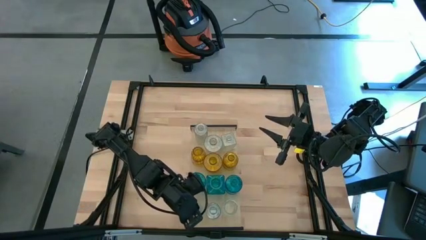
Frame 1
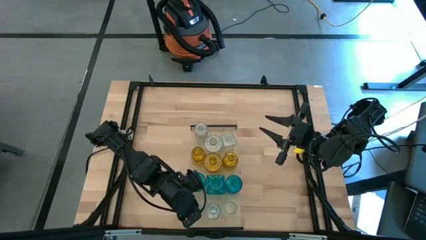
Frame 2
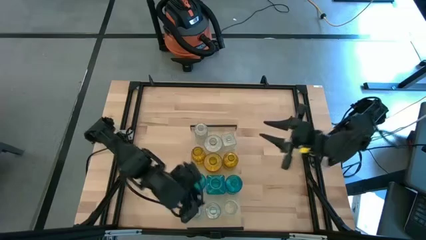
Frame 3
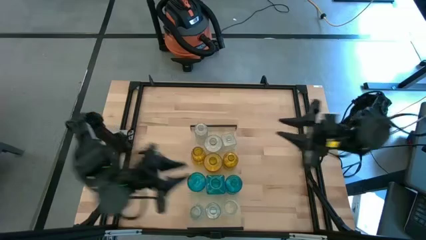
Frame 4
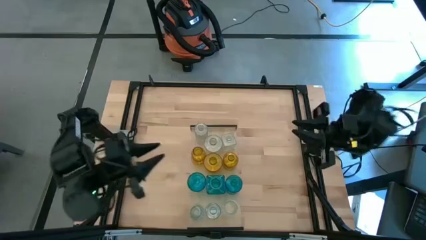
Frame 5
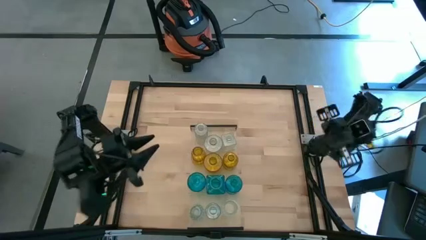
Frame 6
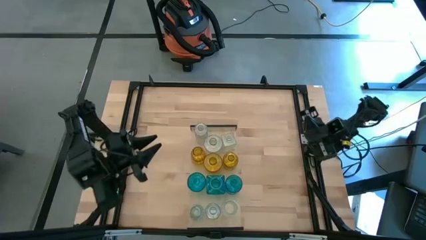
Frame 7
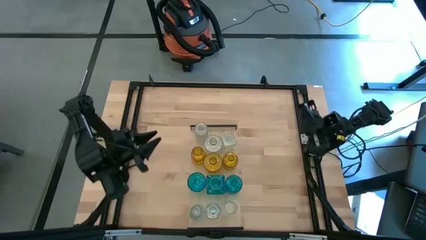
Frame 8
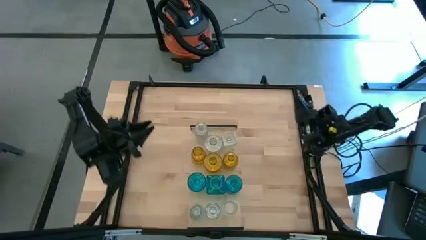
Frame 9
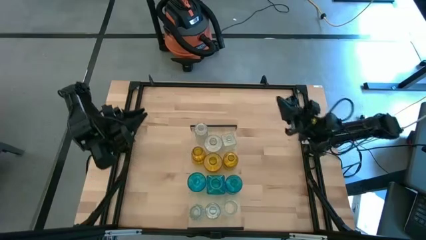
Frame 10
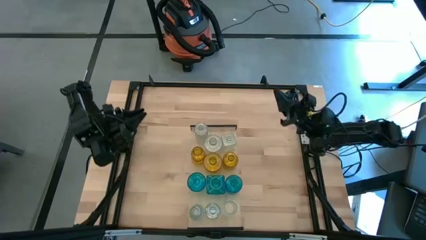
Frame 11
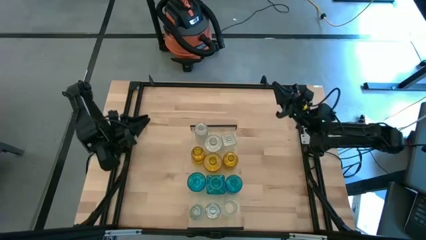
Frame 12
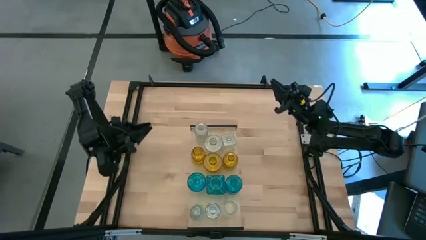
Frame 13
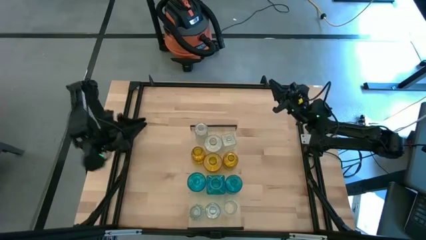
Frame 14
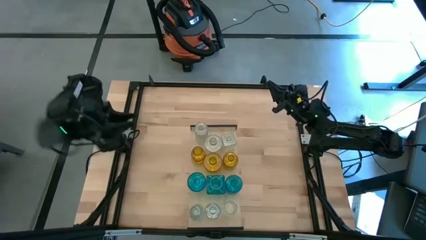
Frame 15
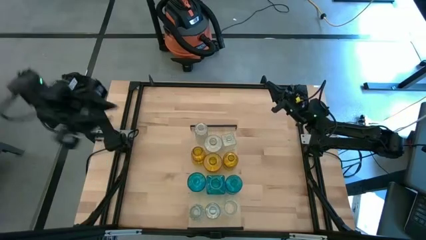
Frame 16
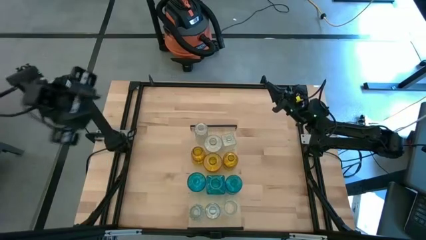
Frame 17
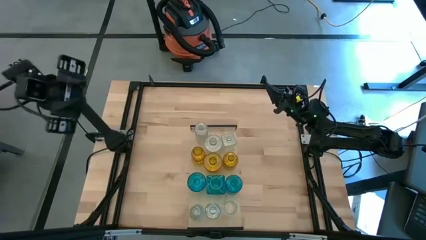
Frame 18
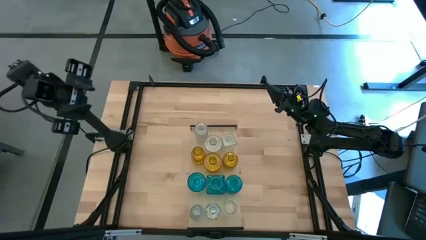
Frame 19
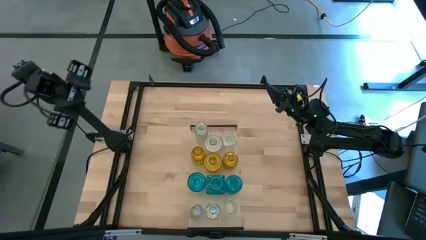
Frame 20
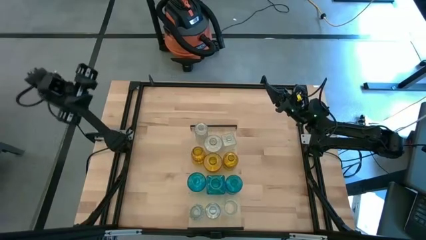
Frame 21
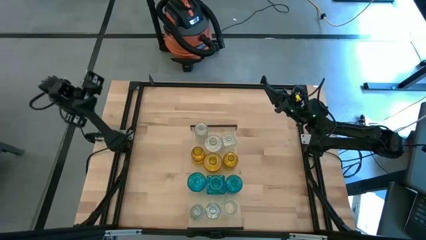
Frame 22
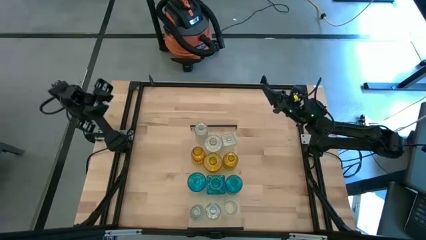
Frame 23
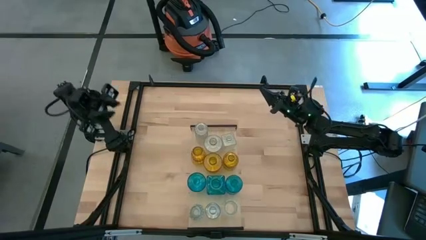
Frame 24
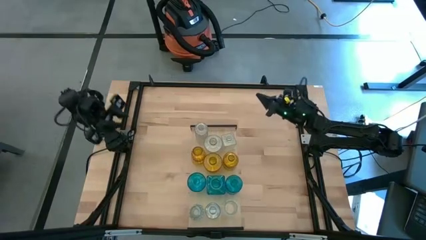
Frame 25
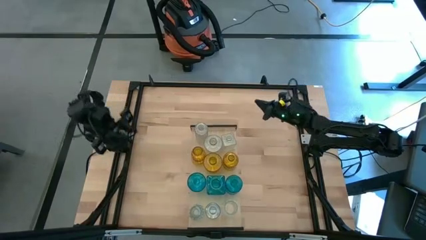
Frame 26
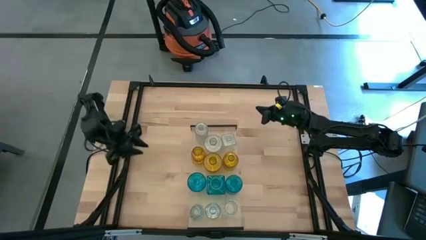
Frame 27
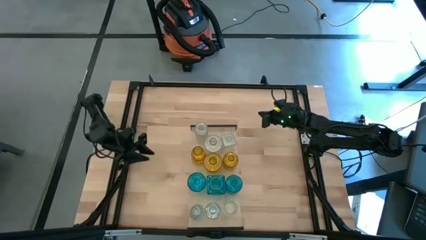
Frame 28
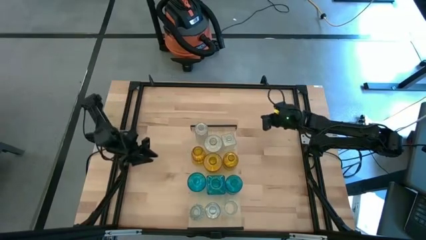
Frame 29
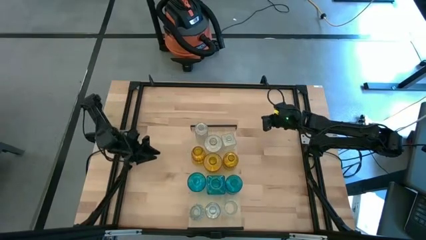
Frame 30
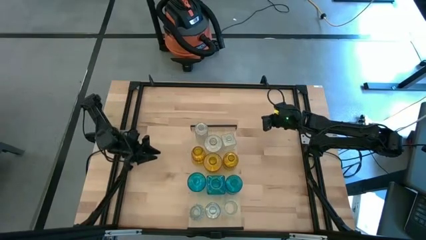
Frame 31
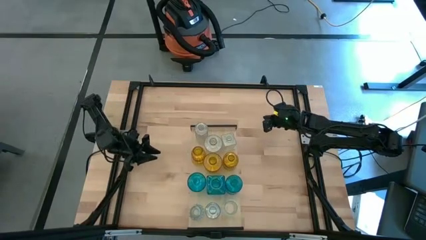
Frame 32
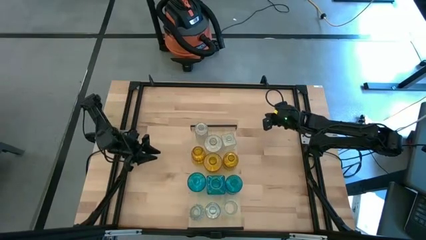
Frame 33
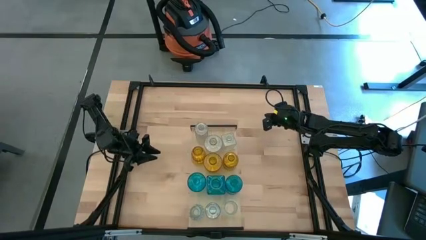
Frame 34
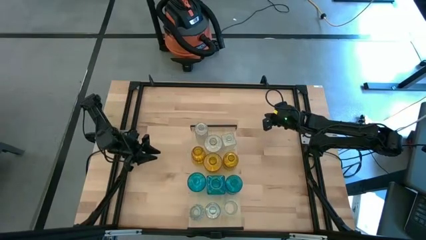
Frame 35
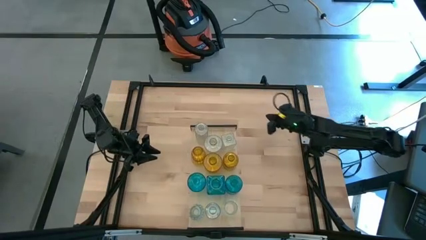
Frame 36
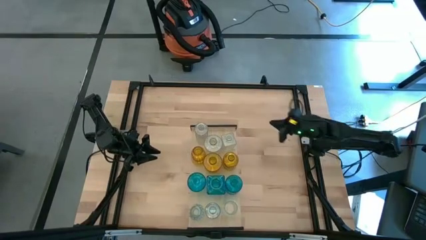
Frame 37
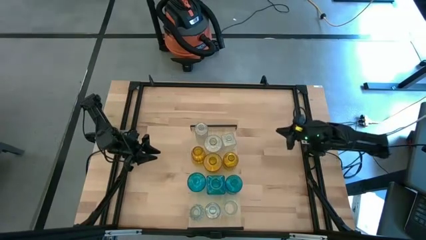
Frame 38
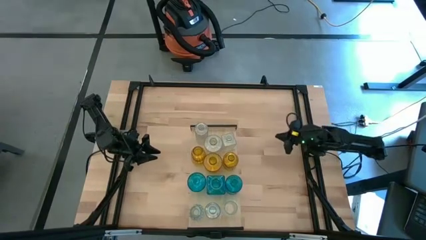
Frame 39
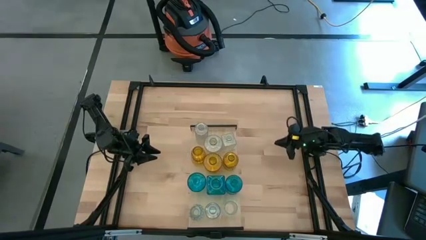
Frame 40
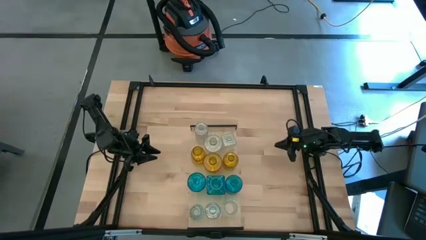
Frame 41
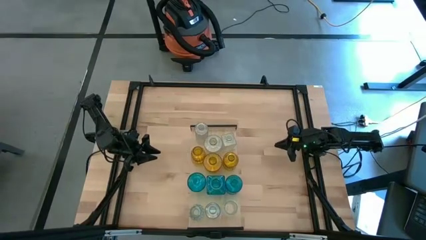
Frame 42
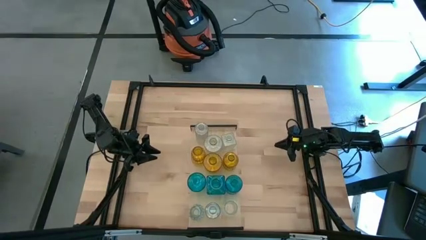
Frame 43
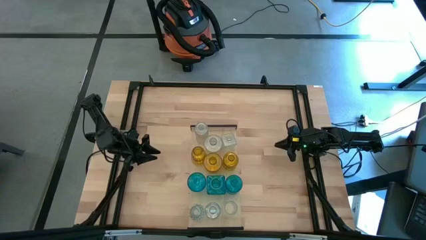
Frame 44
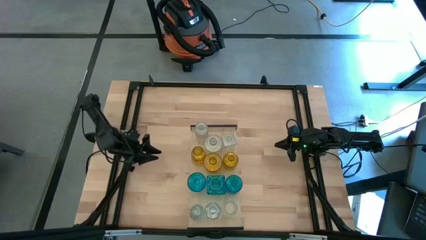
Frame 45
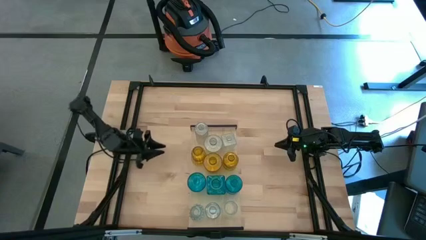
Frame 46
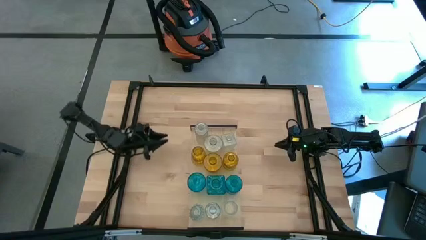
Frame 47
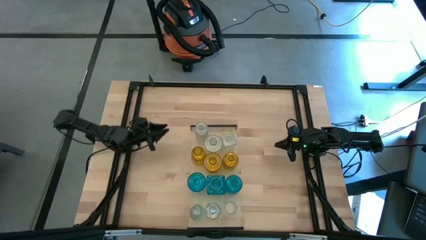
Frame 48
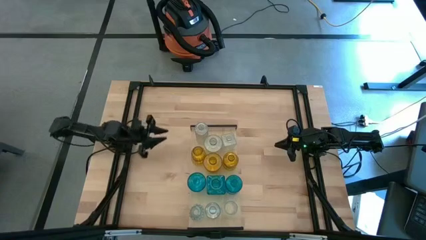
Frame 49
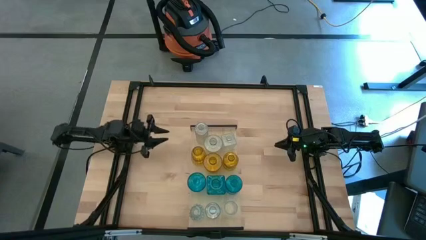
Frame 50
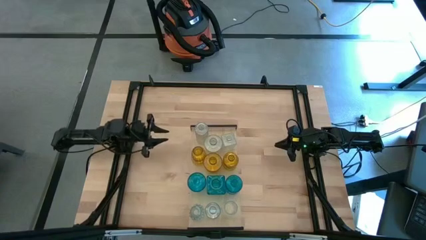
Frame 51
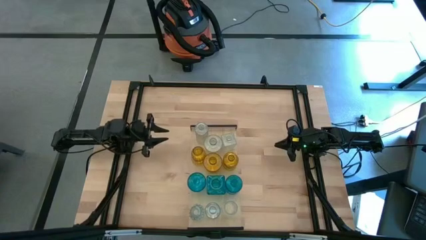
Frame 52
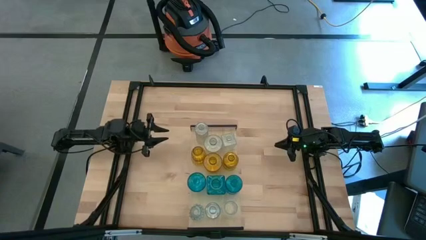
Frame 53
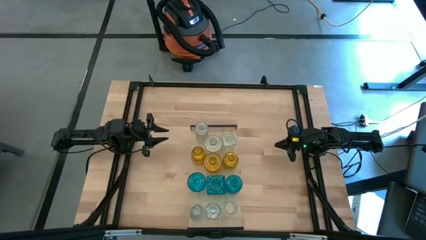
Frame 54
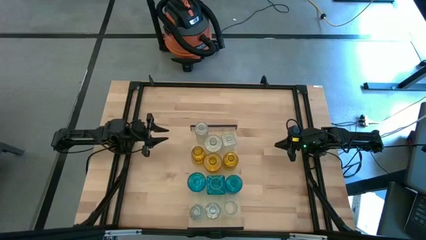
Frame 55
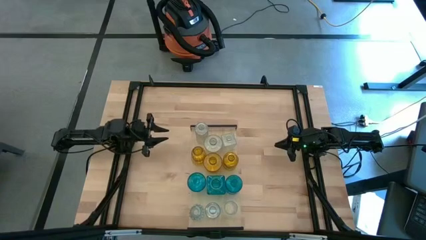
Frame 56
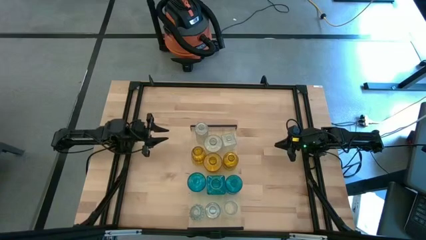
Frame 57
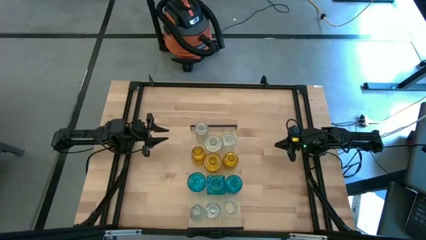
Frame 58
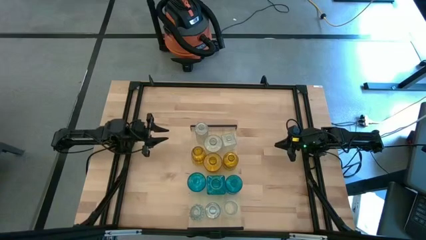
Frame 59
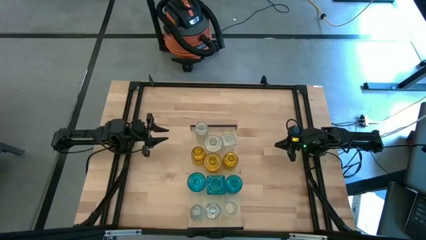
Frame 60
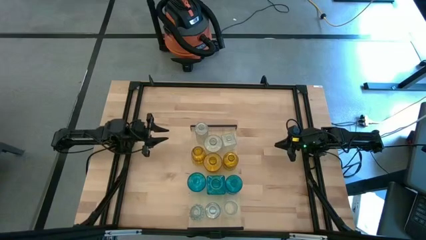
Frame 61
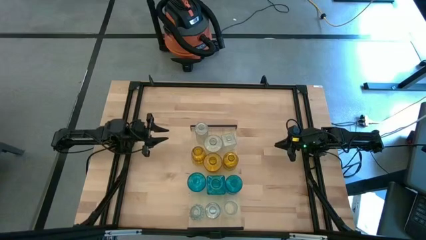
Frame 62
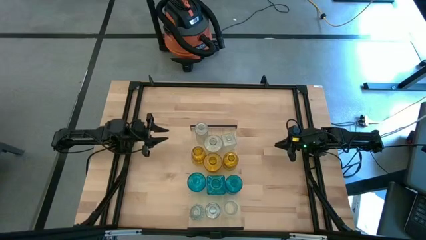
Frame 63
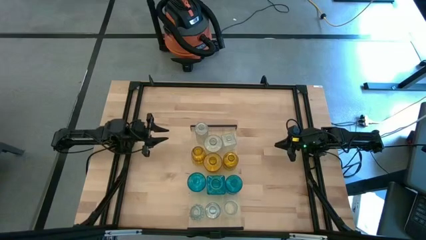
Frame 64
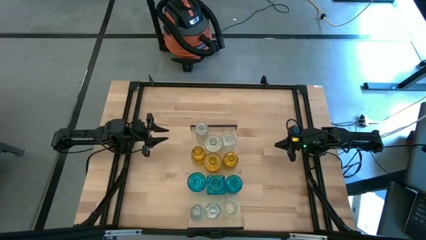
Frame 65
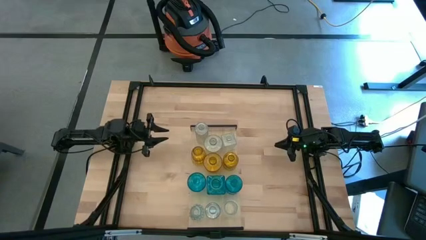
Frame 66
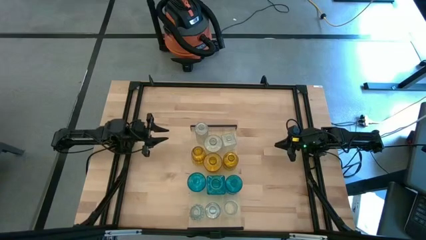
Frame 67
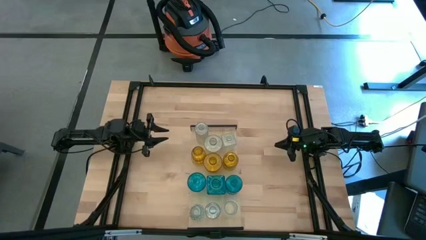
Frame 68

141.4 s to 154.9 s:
Task: sort vases onto shelf
Return to Home Position
